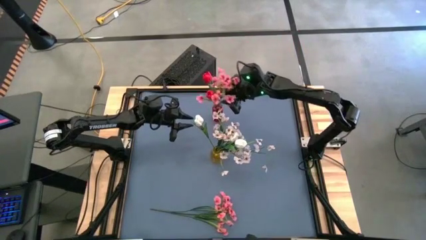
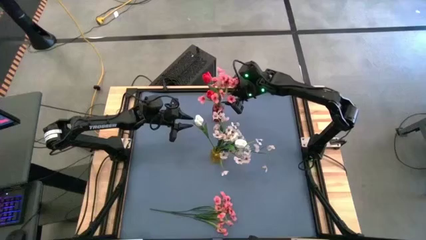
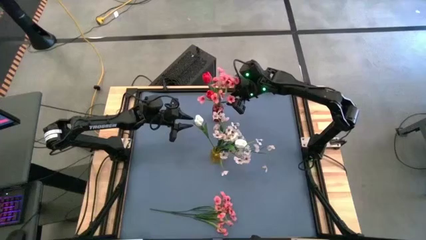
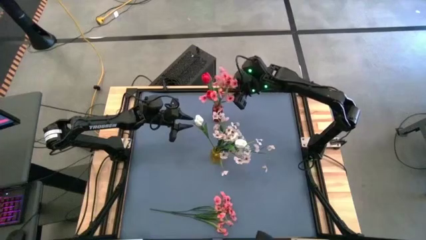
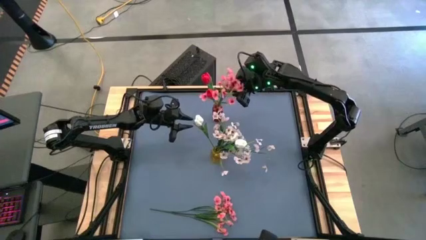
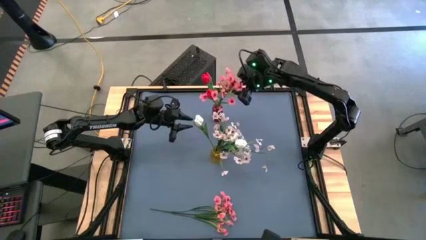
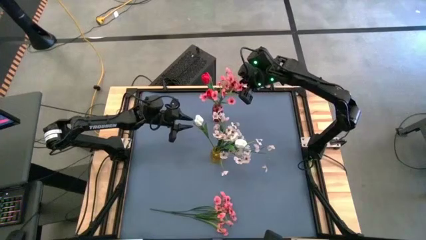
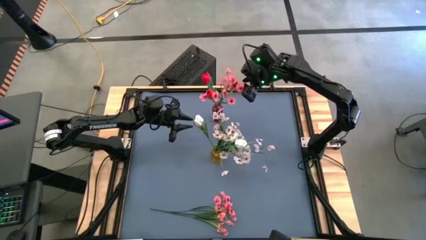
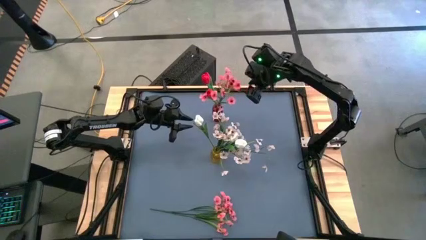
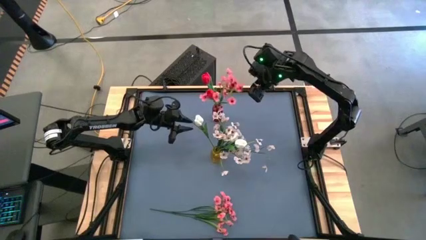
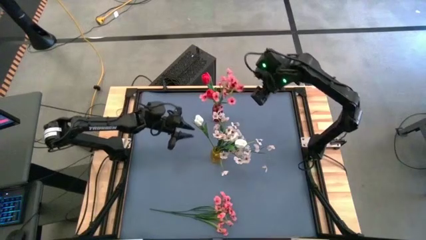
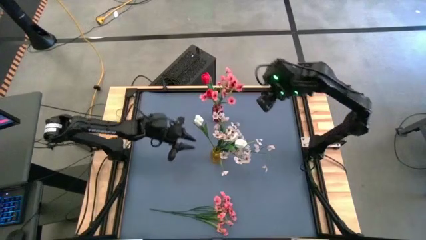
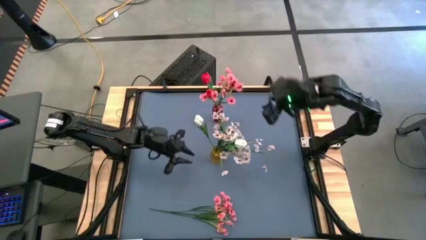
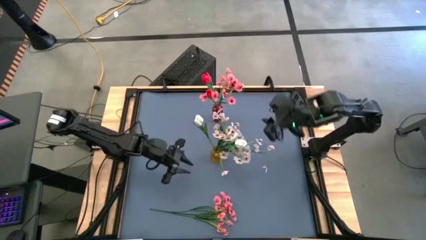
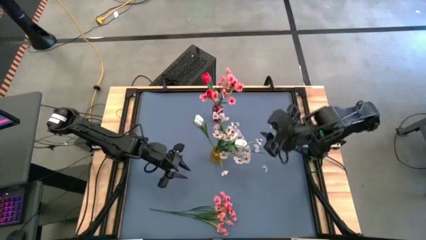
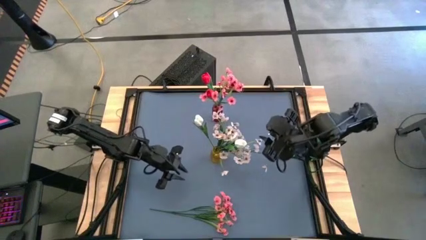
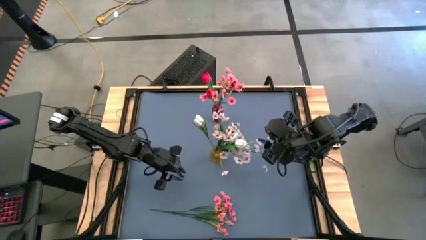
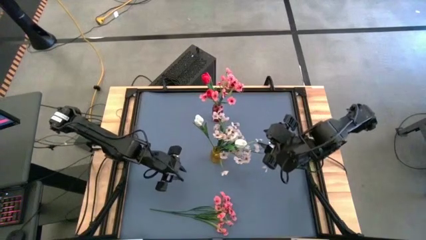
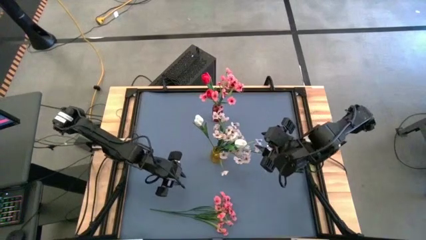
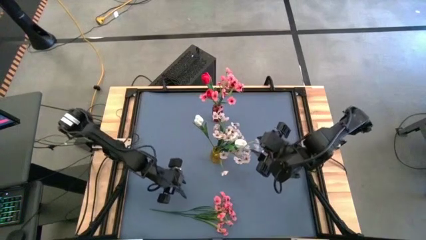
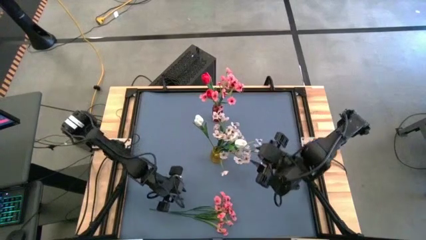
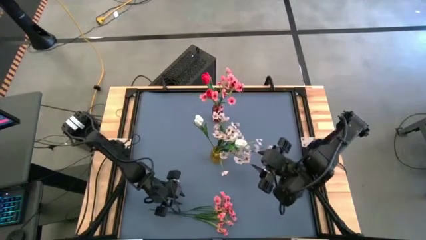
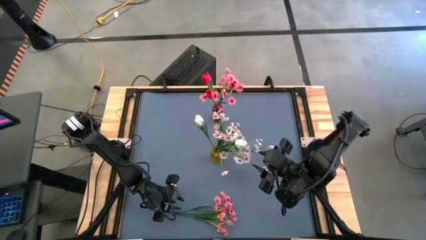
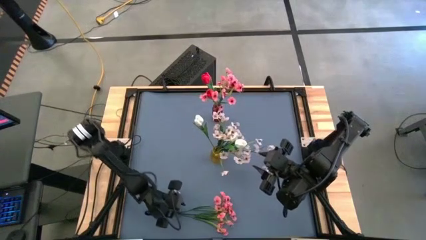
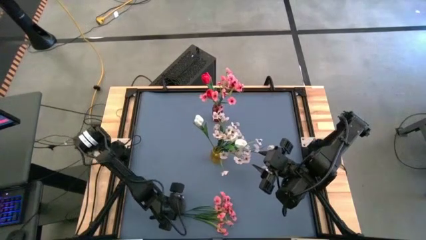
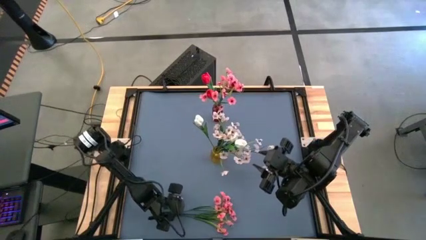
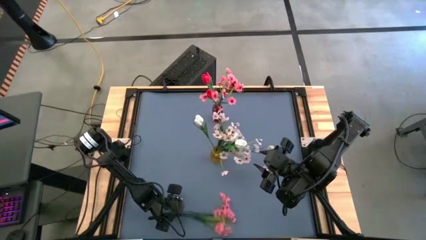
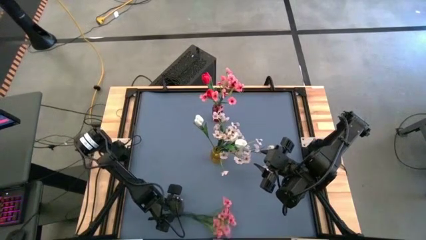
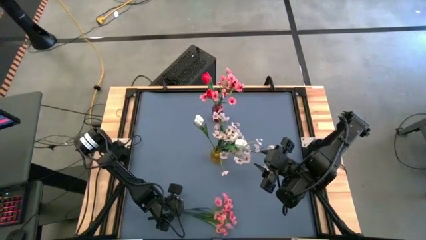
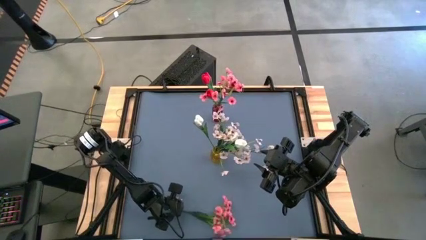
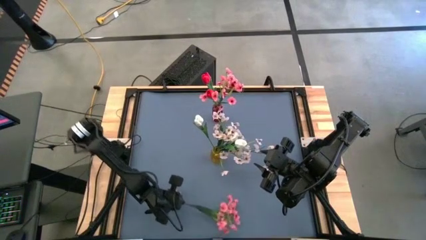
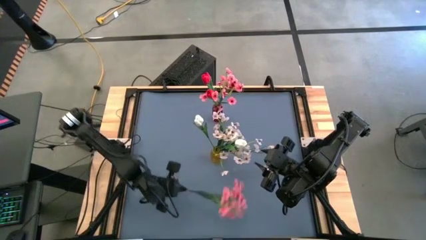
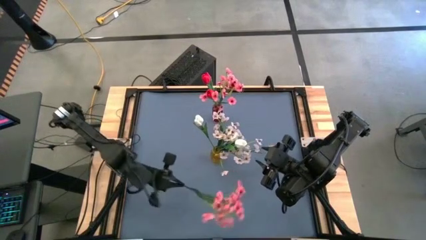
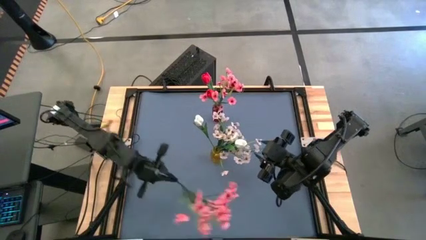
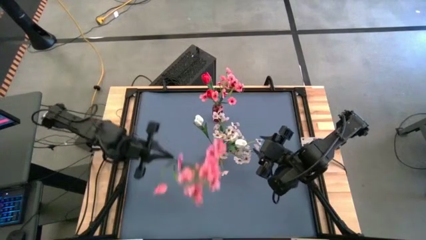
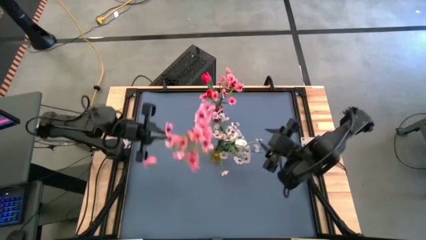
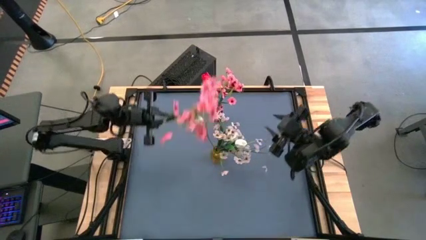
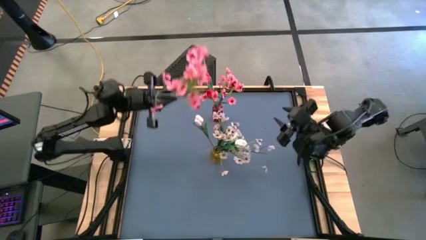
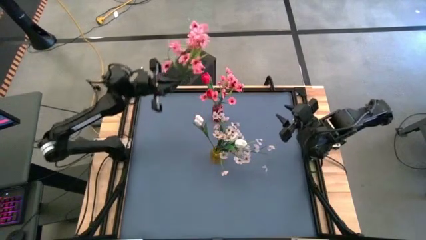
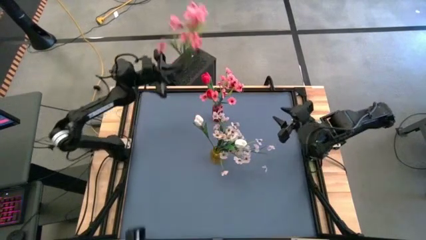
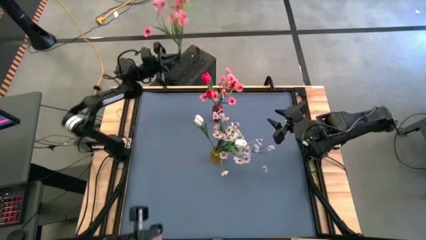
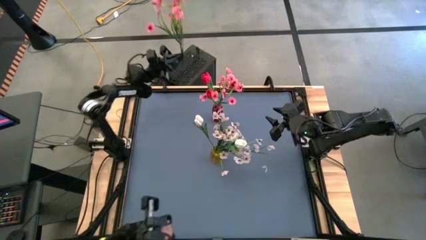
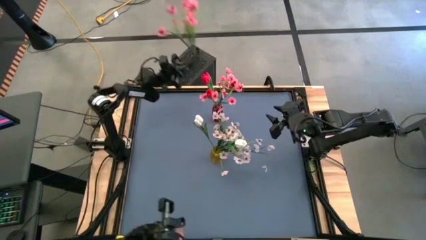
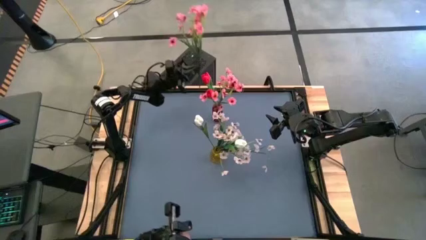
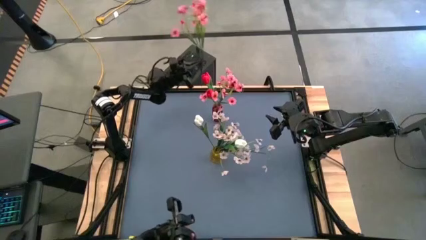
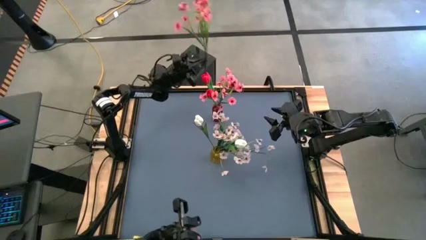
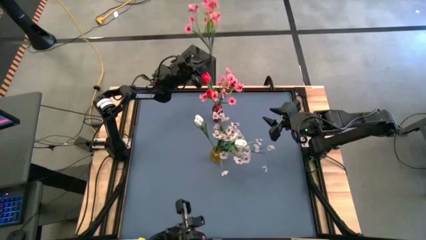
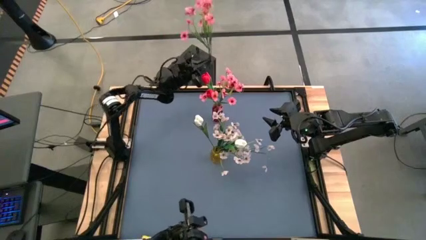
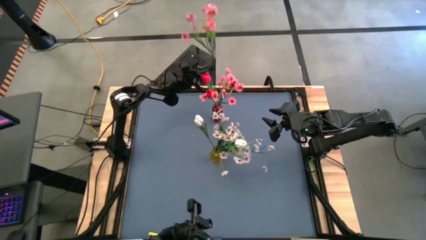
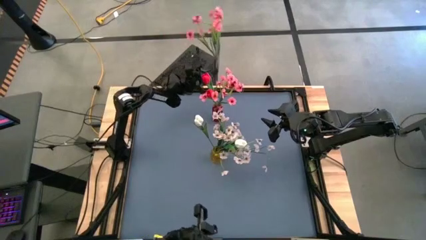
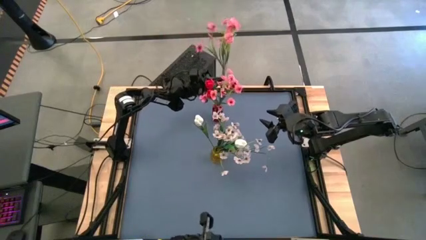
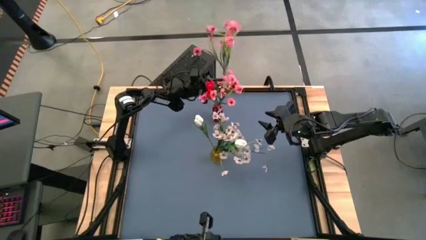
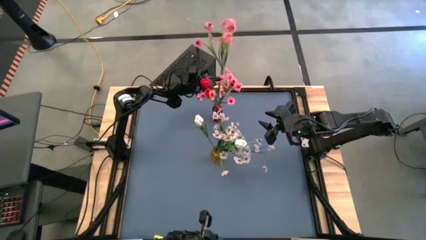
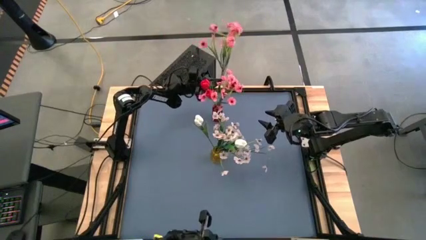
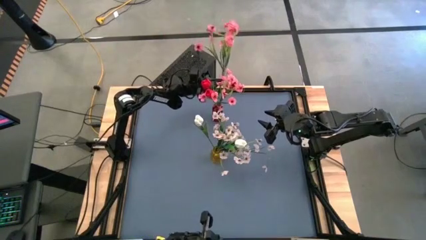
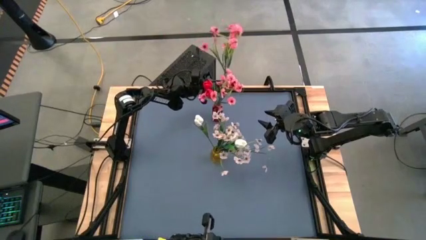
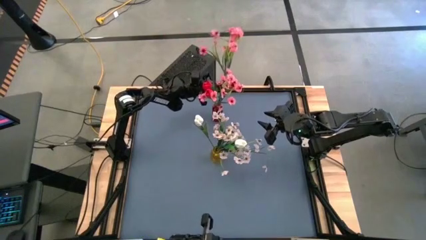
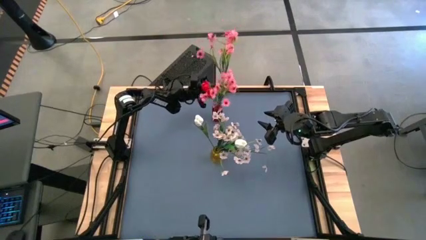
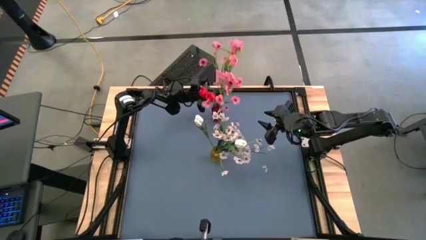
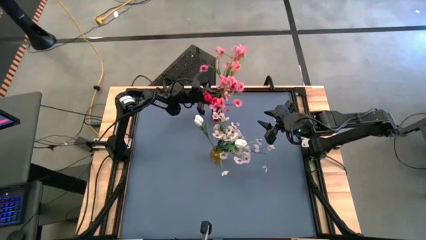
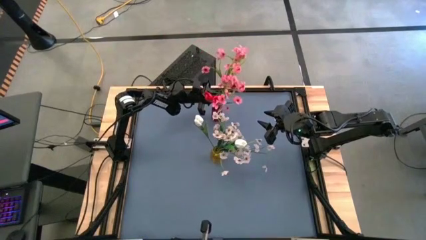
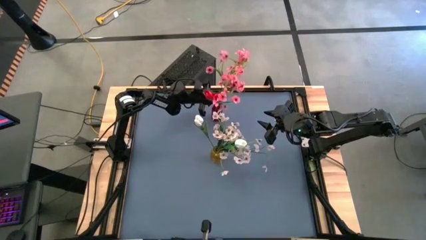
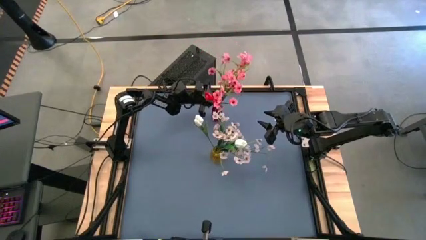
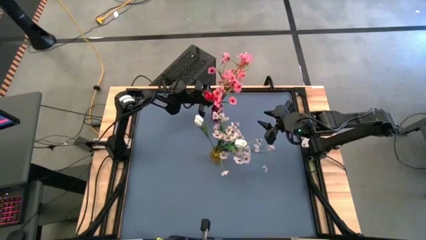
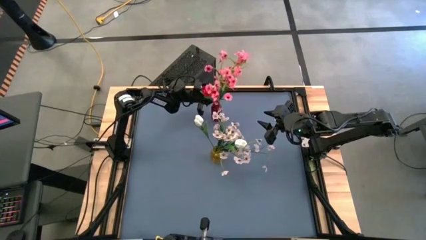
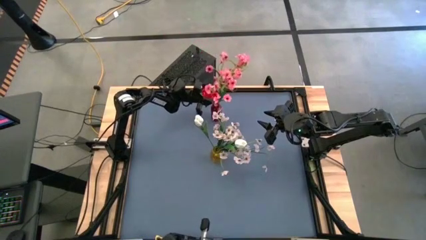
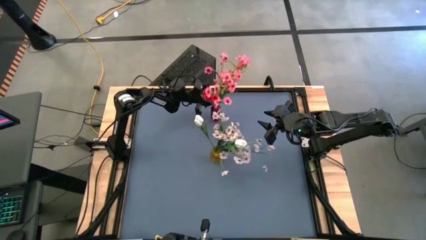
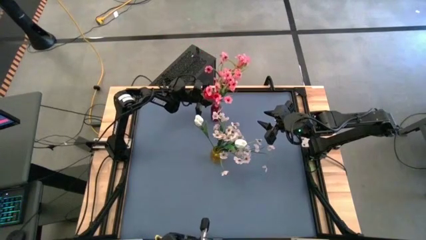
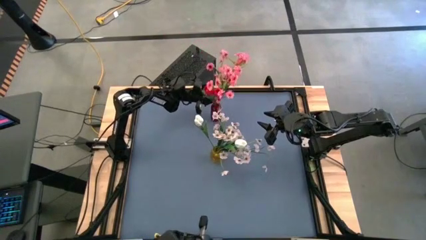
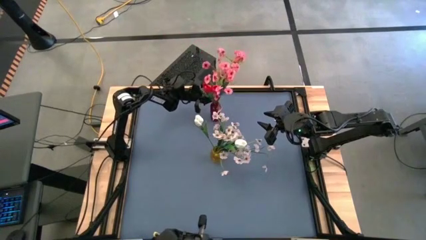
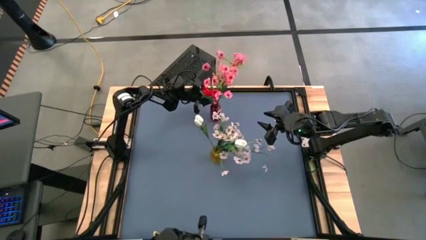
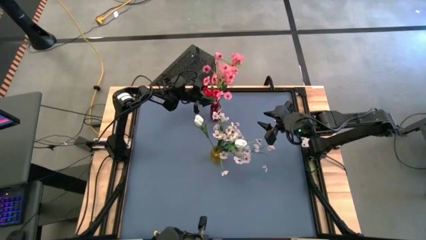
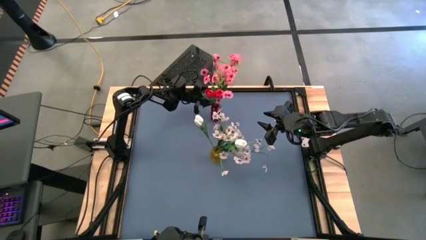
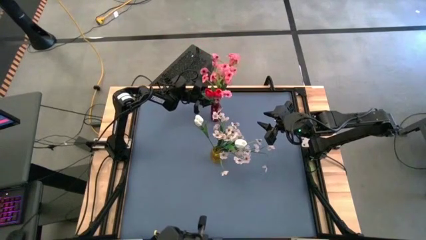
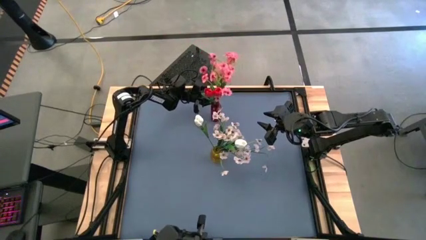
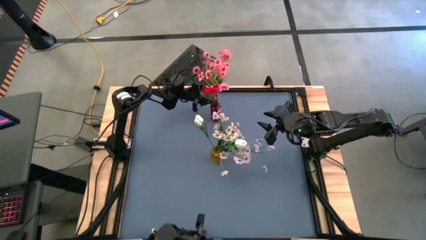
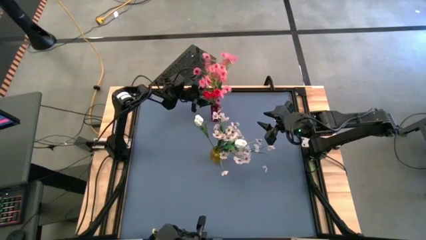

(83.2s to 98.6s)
Task: Sort flowers into vase by color
Put the pink flowers into the red flower vase
